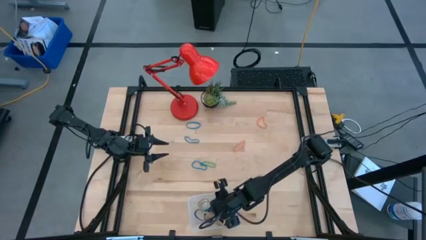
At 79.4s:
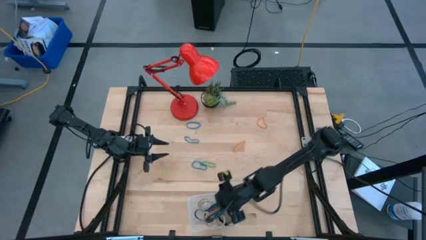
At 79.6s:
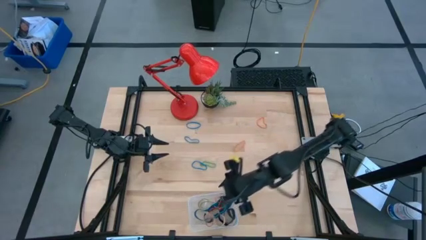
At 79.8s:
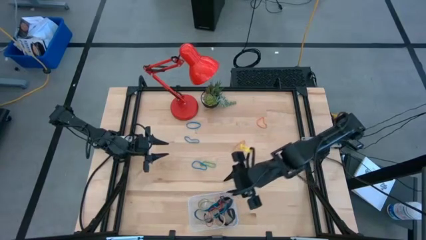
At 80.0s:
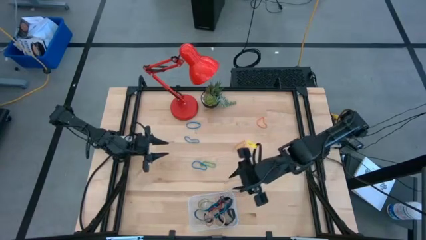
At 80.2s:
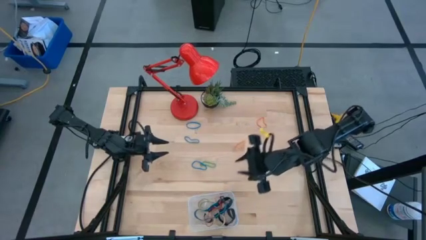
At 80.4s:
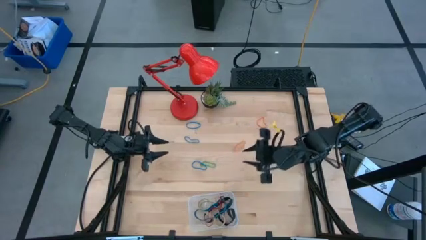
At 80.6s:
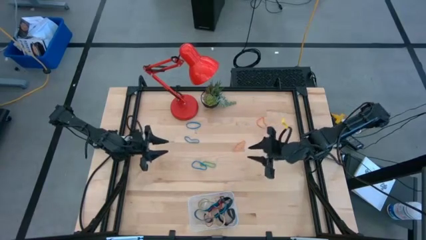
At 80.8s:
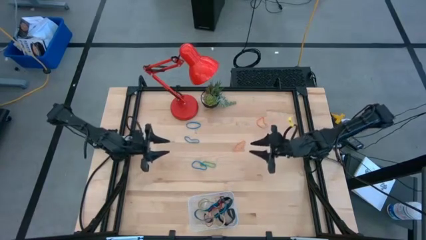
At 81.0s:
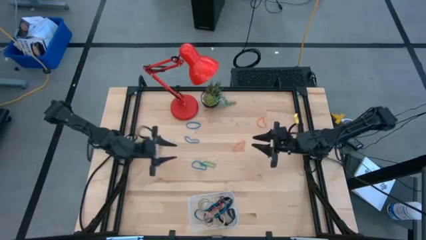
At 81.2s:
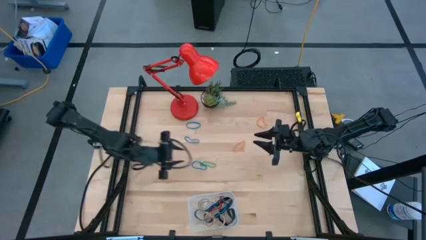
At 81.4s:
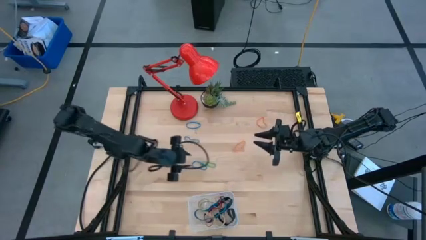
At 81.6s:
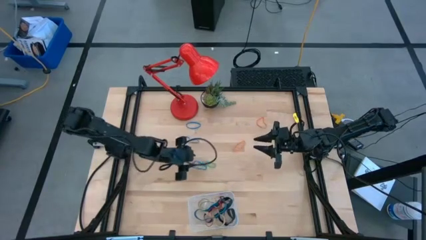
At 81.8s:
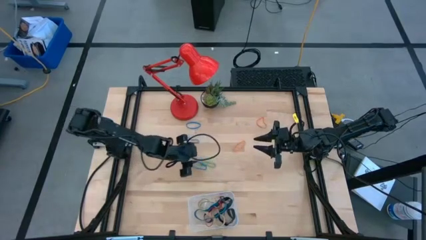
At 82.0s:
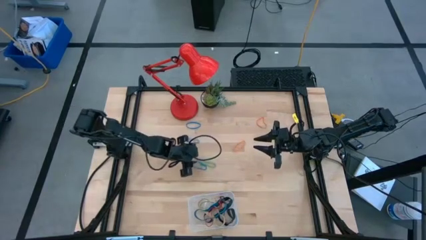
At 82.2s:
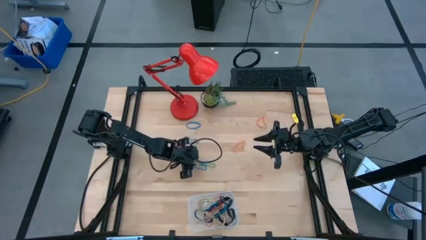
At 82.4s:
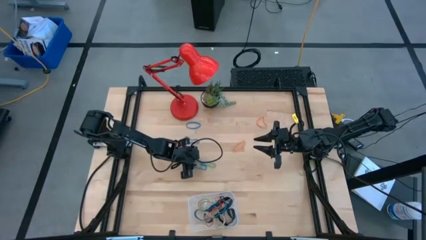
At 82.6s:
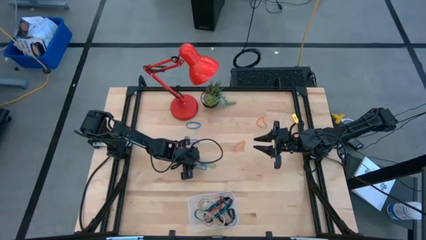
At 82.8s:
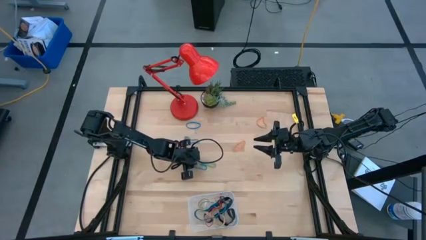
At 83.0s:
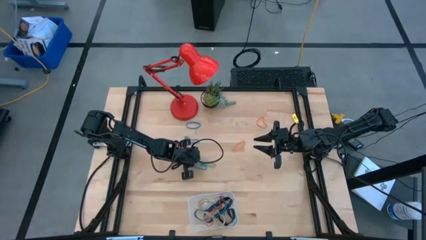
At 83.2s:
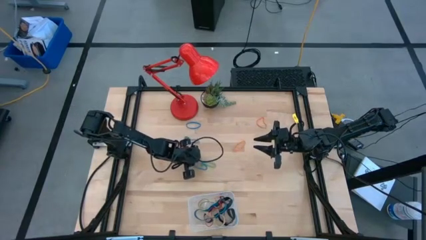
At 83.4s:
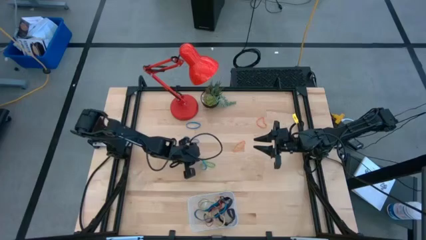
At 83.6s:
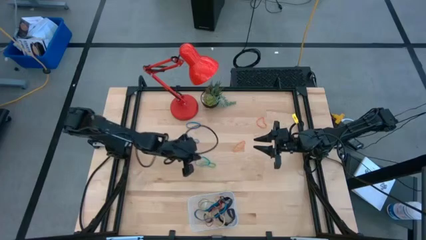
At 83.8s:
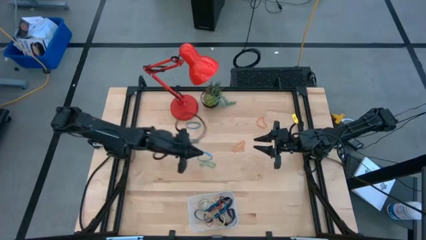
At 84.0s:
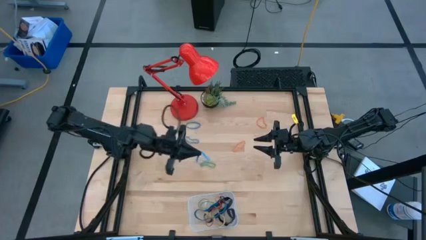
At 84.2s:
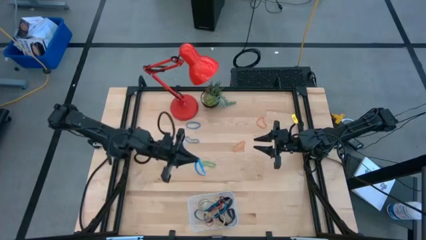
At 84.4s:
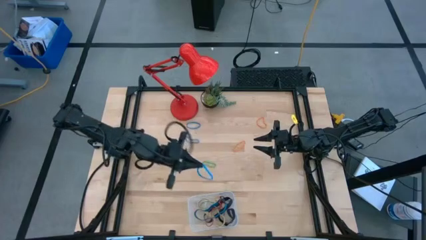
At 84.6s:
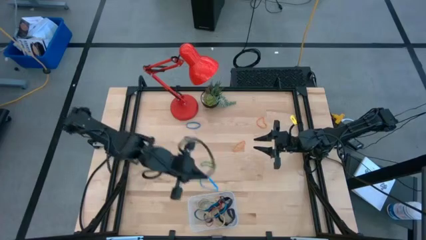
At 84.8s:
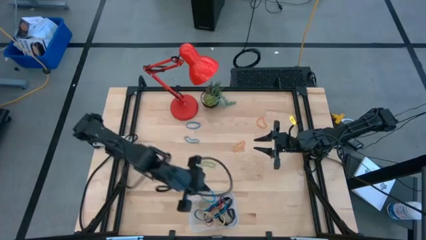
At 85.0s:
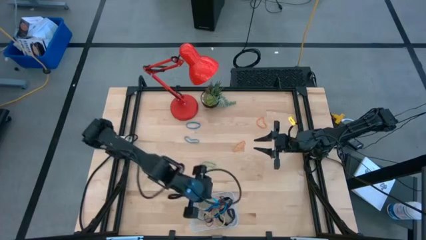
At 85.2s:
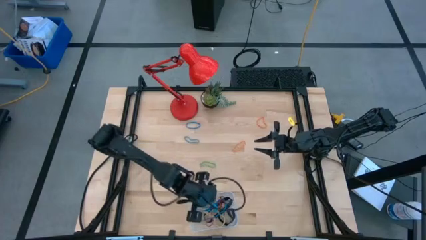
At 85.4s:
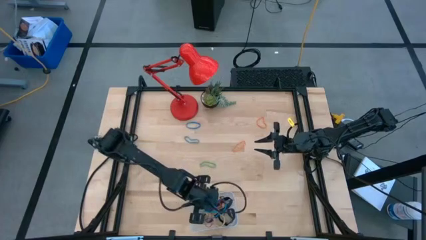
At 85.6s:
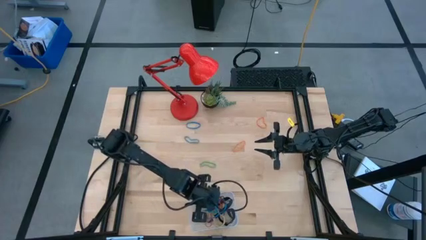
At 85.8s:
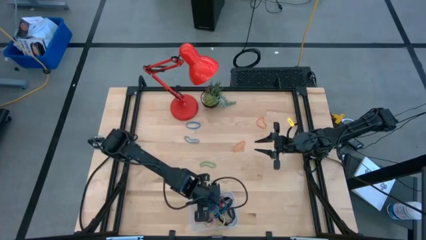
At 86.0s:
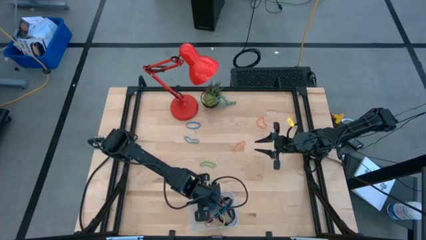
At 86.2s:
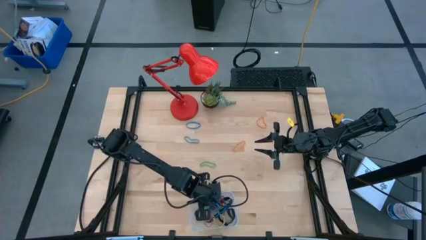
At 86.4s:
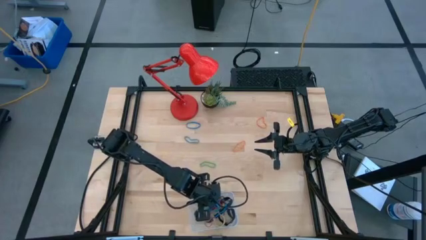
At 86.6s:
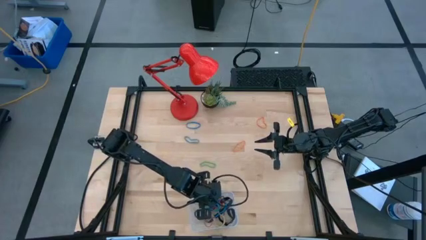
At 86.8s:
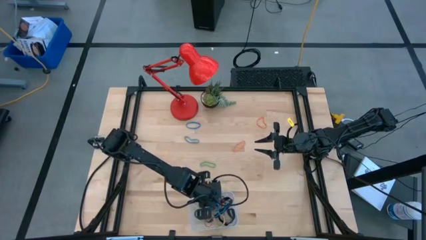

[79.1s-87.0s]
Task: Pick and place rubber bands into bin
Put the blue rubber band into the transparent bin

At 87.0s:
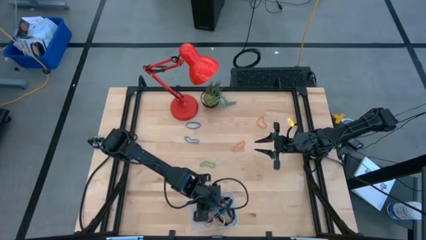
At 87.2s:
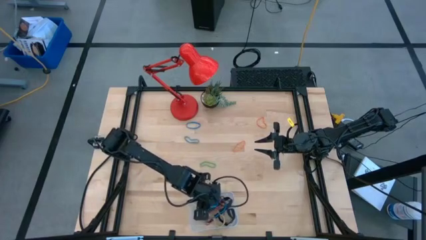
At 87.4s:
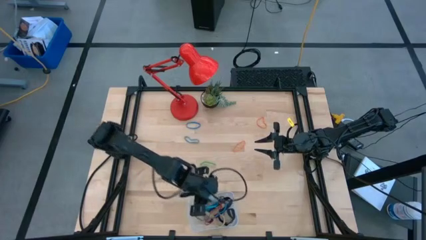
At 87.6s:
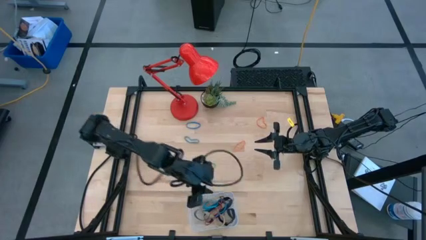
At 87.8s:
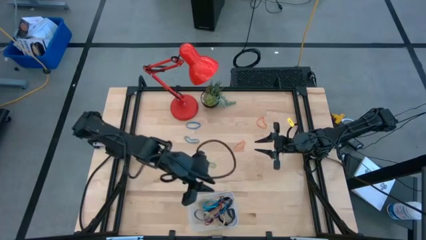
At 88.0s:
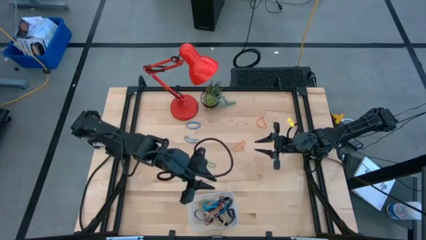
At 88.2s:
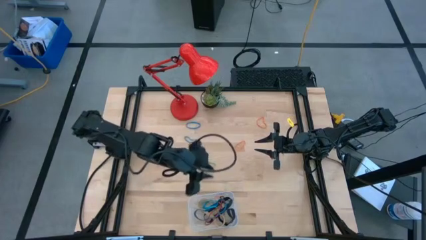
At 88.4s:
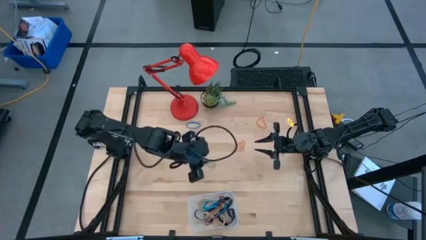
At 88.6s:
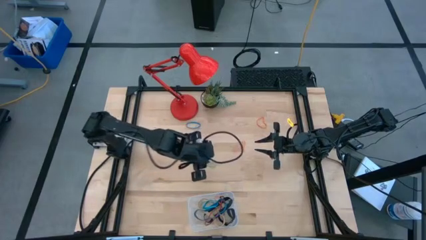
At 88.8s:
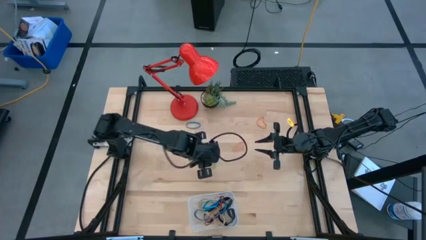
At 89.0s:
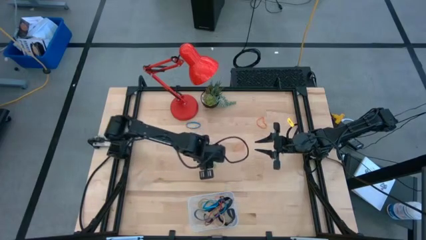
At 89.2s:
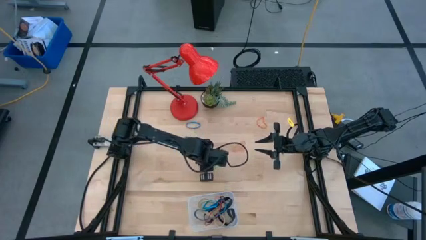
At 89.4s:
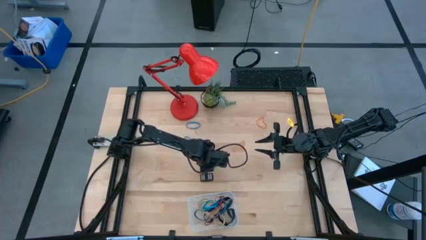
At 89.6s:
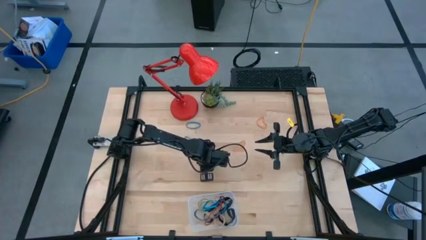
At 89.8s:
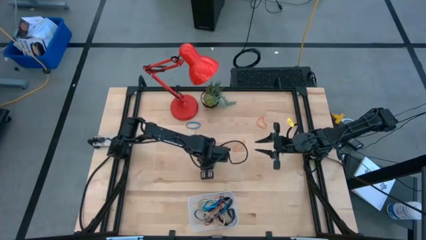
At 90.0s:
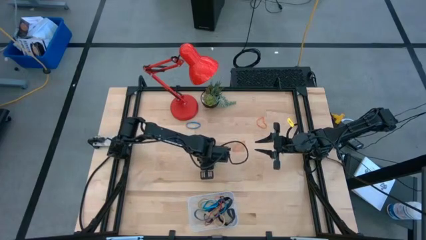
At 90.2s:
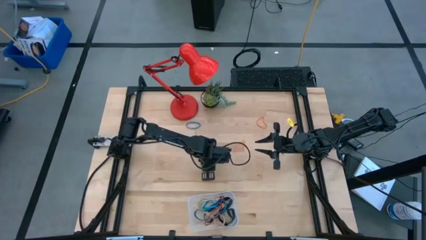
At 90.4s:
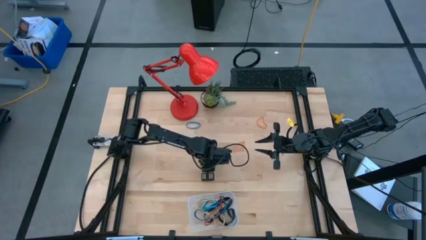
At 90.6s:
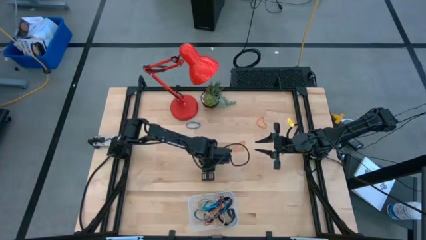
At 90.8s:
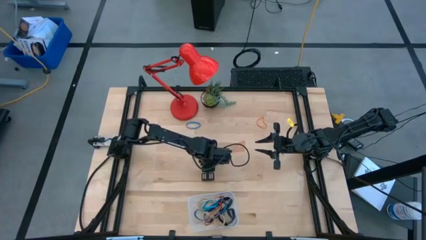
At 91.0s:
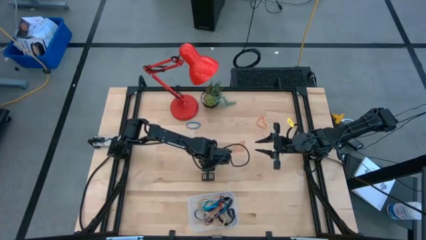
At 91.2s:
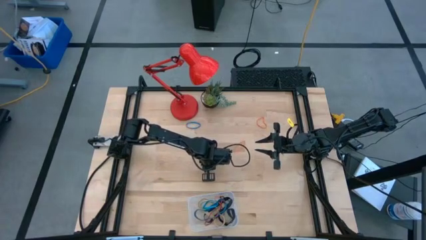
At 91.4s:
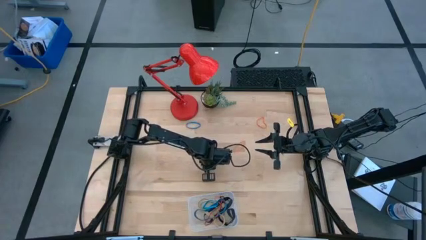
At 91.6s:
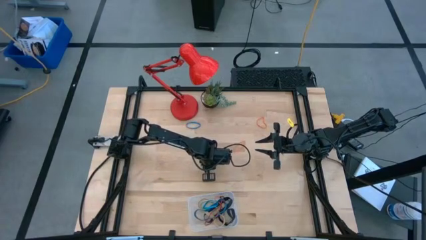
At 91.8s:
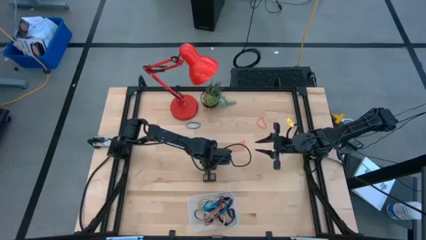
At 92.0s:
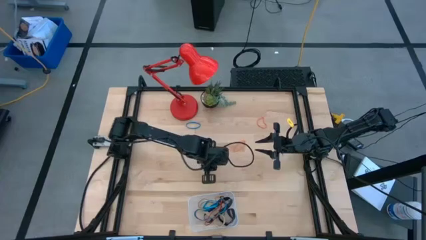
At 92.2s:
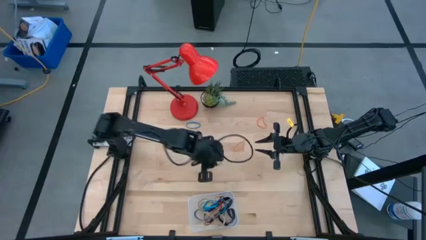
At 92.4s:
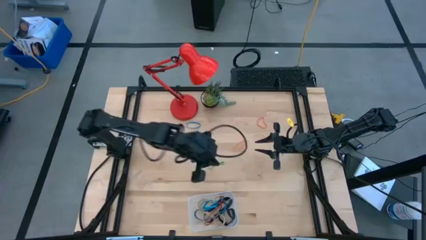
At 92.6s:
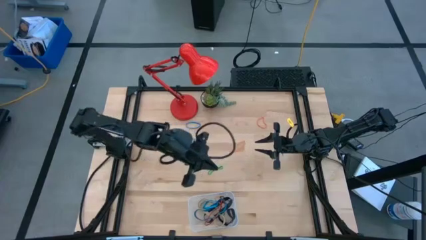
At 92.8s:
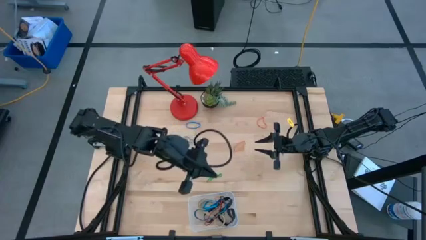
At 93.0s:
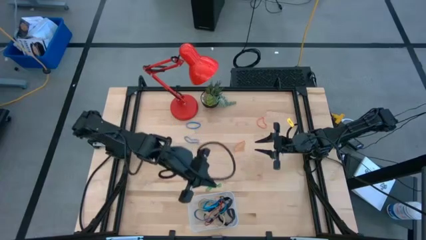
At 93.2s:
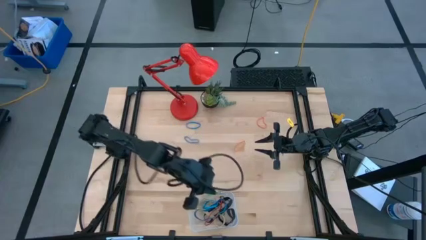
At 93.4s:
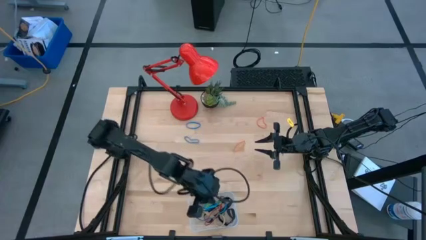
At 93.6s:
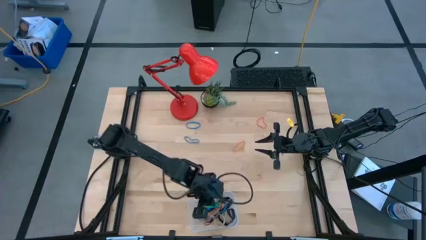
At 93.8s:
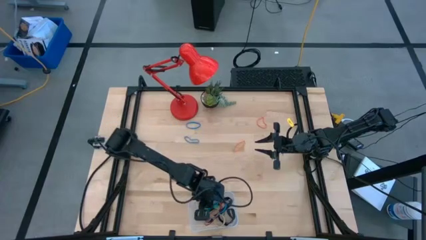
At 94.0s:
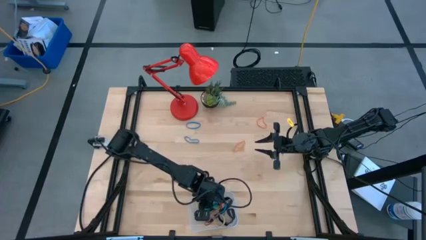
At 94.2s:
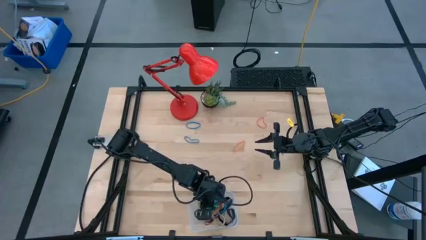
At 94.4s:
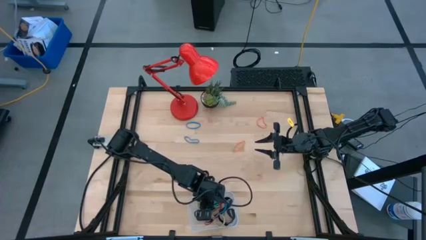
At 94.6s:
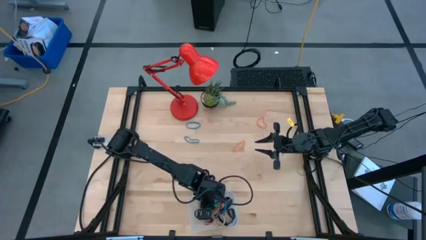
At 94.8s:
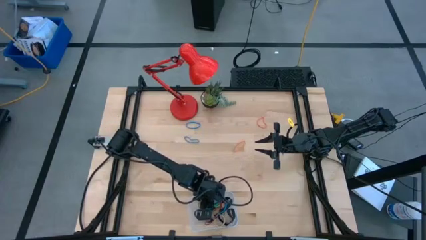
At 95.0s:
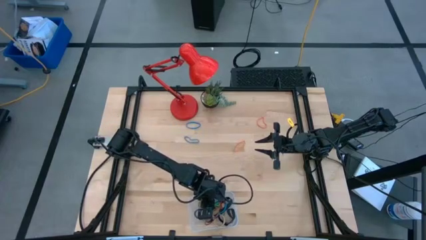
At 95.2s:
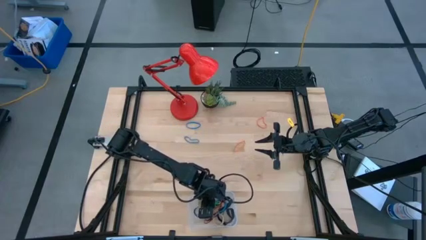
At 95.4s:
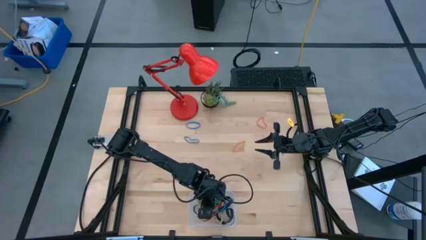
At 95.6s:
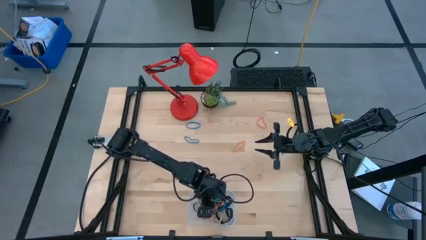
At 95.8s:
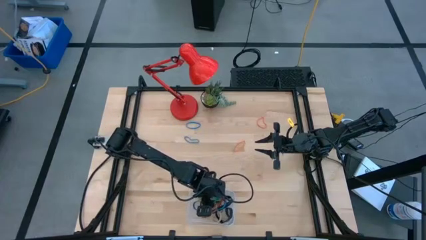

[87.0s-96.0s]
Put the green rubber band into the transparent bin
